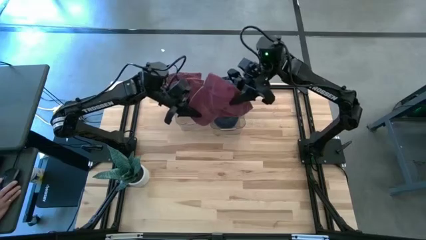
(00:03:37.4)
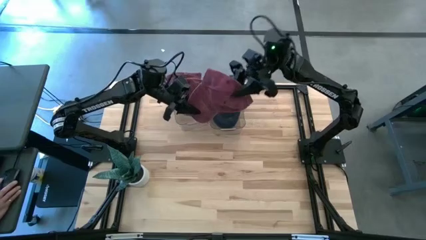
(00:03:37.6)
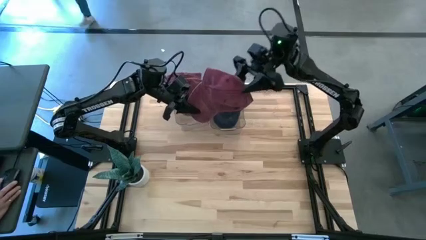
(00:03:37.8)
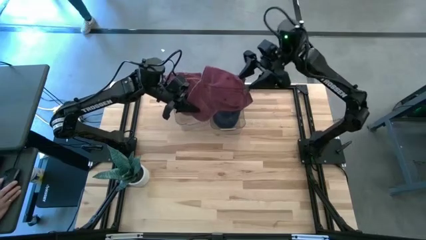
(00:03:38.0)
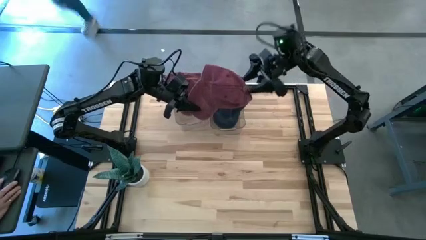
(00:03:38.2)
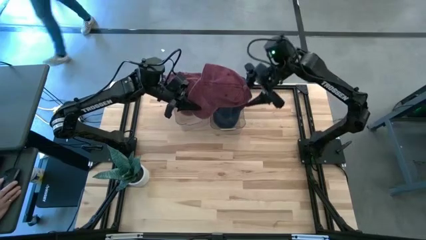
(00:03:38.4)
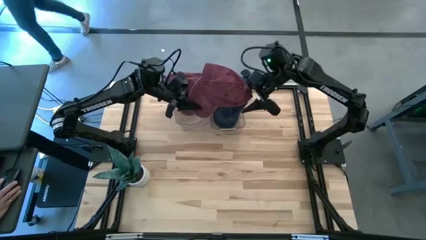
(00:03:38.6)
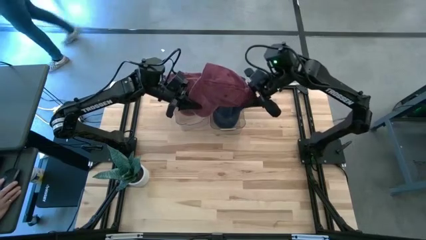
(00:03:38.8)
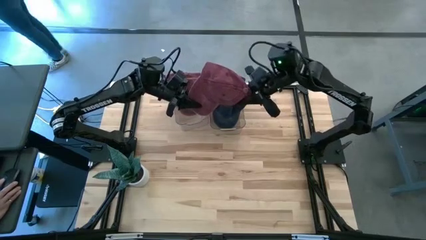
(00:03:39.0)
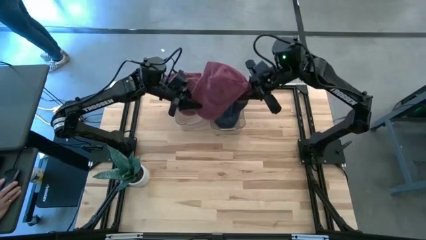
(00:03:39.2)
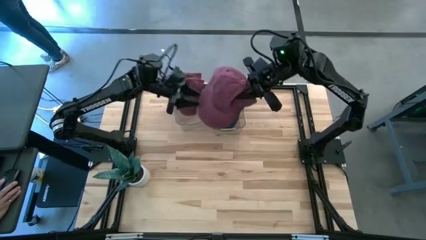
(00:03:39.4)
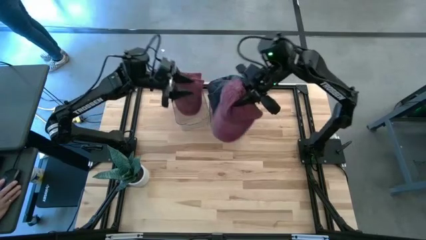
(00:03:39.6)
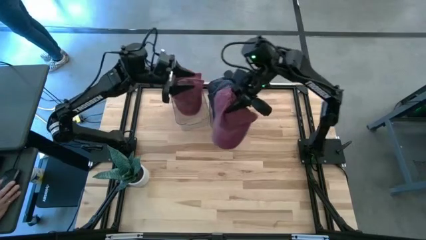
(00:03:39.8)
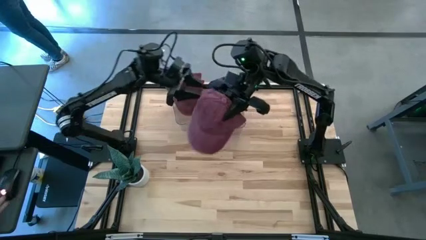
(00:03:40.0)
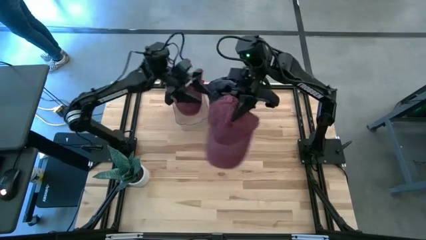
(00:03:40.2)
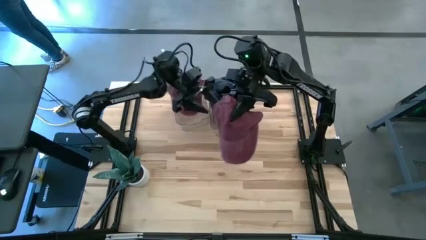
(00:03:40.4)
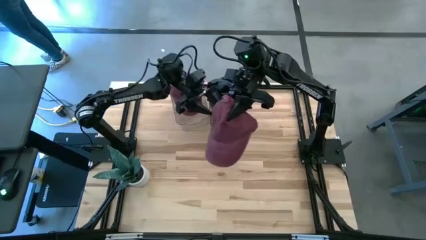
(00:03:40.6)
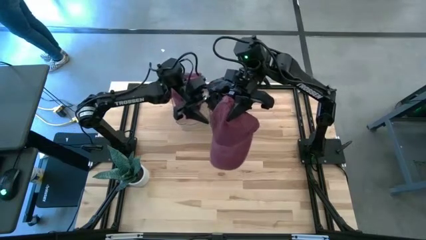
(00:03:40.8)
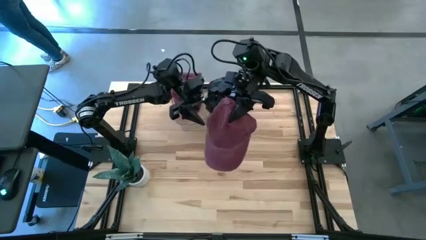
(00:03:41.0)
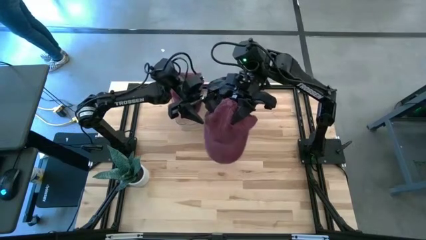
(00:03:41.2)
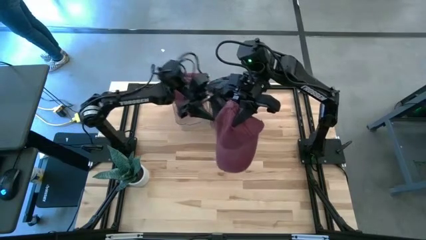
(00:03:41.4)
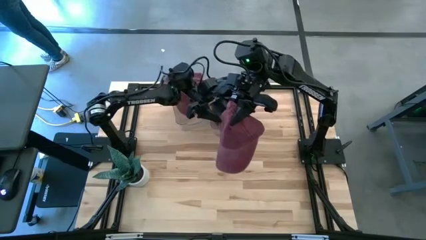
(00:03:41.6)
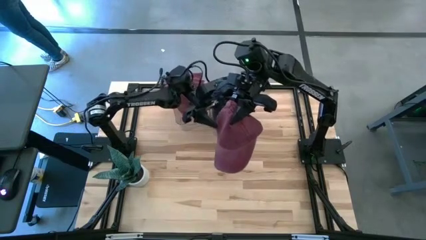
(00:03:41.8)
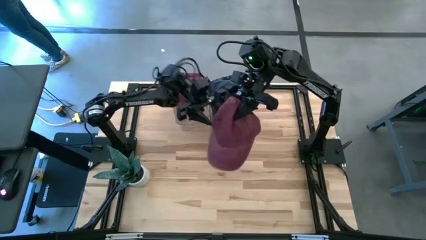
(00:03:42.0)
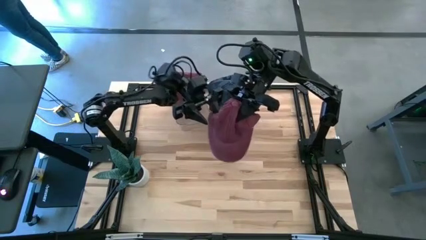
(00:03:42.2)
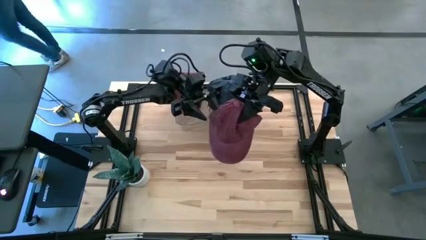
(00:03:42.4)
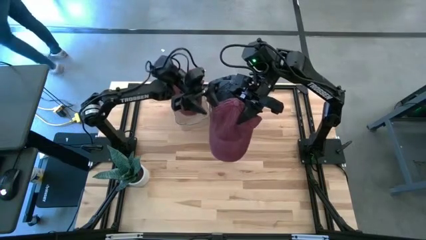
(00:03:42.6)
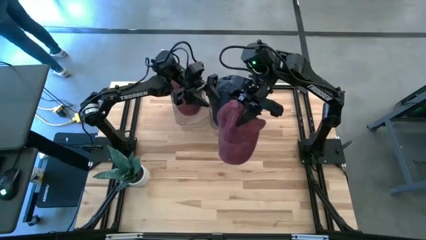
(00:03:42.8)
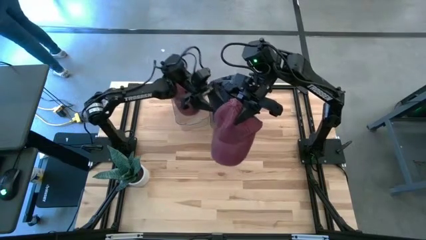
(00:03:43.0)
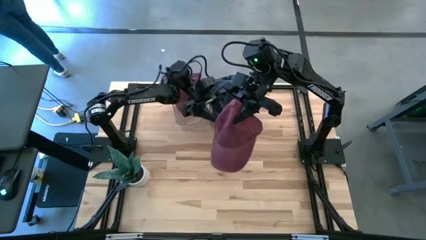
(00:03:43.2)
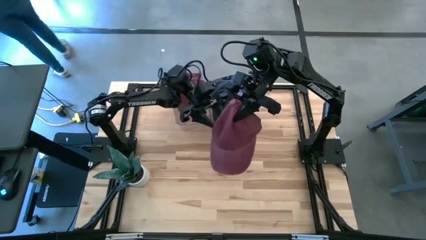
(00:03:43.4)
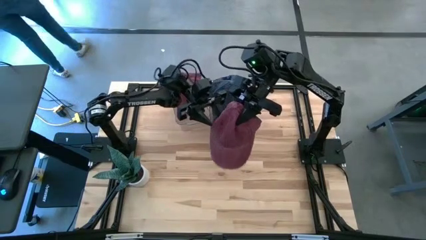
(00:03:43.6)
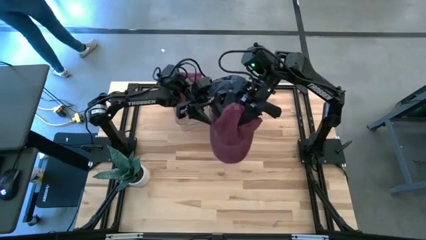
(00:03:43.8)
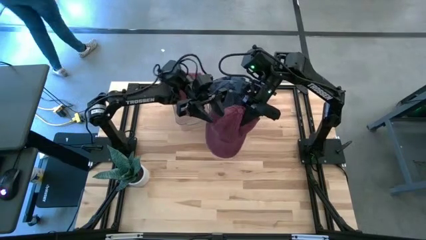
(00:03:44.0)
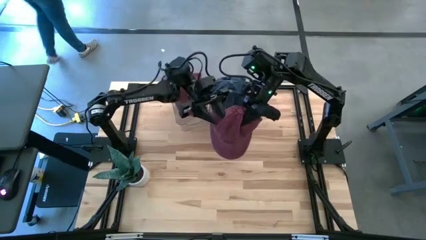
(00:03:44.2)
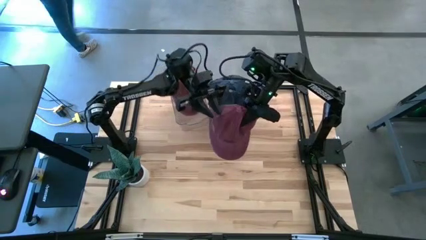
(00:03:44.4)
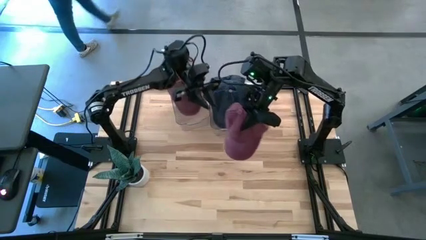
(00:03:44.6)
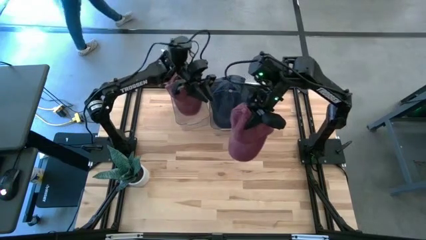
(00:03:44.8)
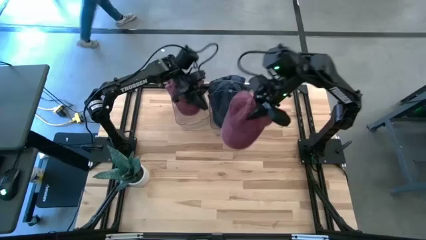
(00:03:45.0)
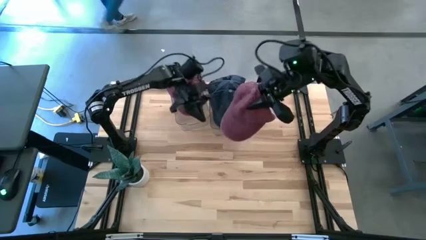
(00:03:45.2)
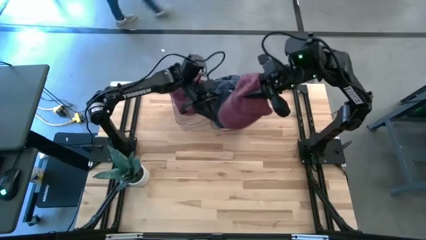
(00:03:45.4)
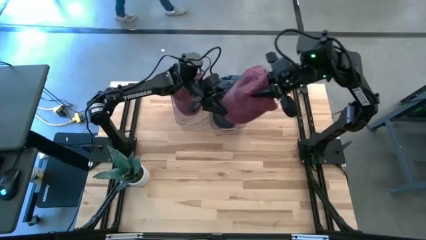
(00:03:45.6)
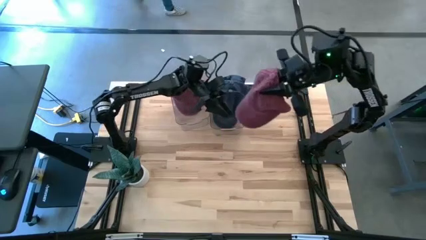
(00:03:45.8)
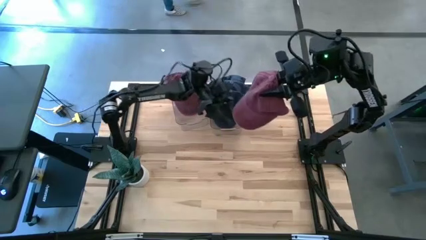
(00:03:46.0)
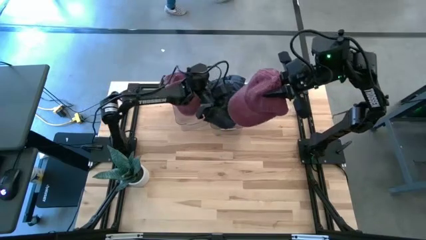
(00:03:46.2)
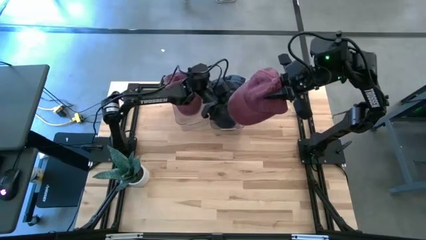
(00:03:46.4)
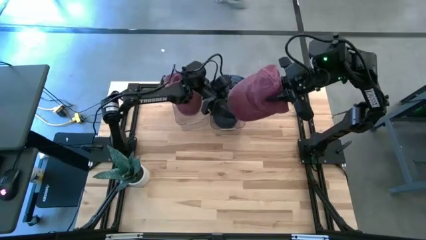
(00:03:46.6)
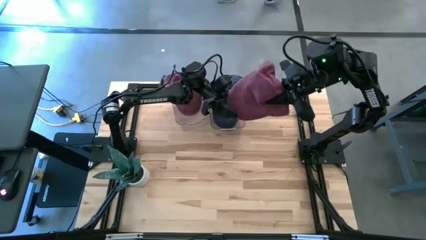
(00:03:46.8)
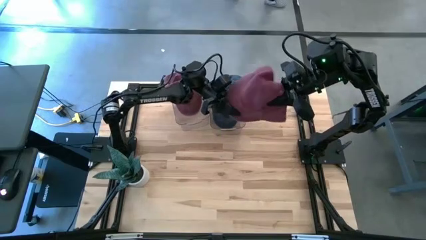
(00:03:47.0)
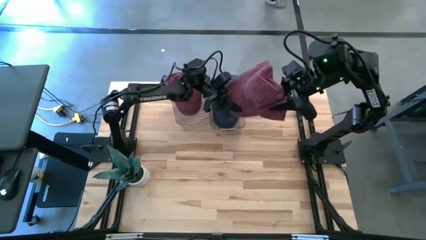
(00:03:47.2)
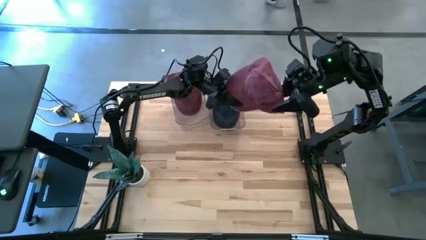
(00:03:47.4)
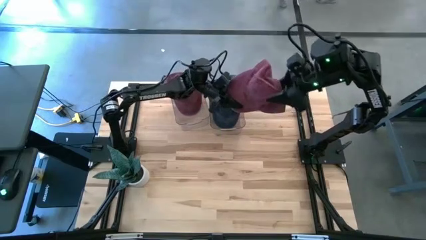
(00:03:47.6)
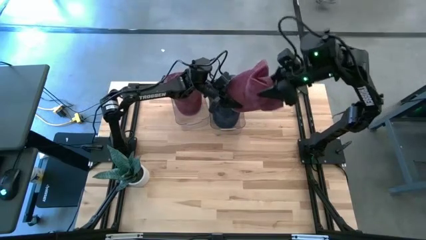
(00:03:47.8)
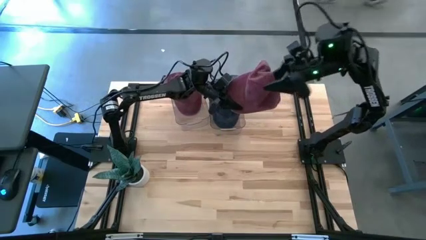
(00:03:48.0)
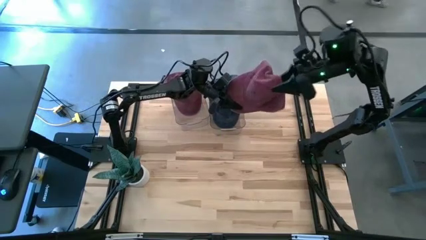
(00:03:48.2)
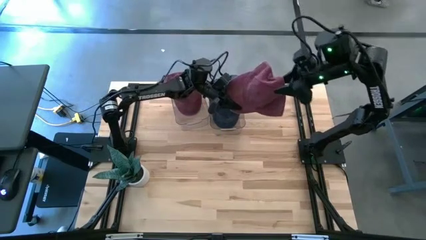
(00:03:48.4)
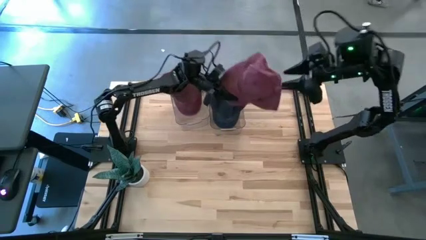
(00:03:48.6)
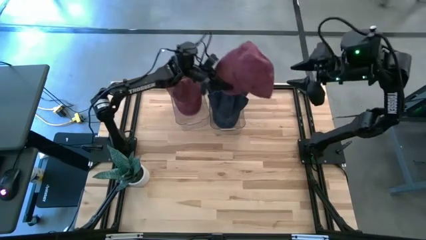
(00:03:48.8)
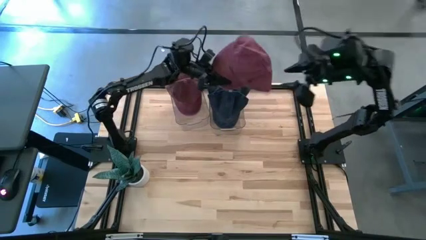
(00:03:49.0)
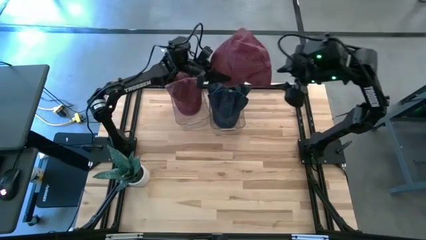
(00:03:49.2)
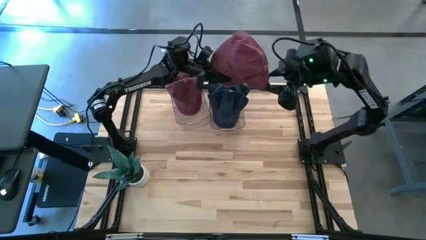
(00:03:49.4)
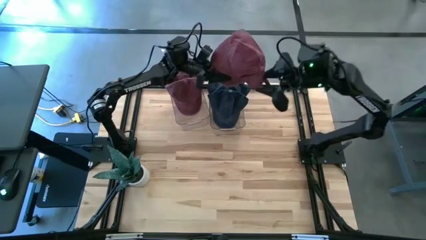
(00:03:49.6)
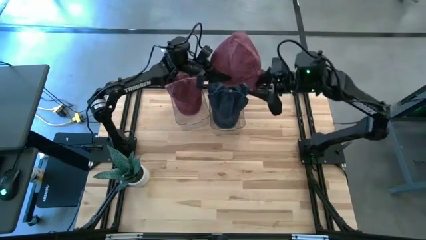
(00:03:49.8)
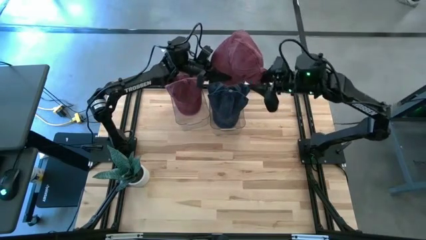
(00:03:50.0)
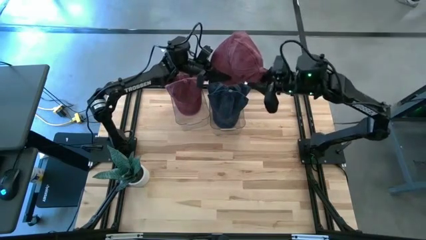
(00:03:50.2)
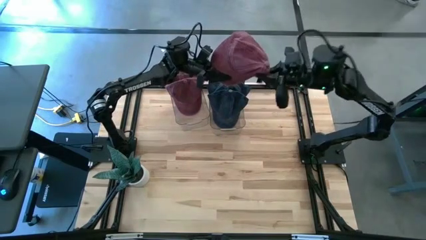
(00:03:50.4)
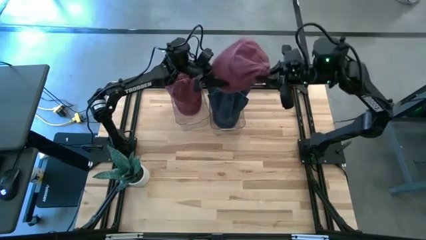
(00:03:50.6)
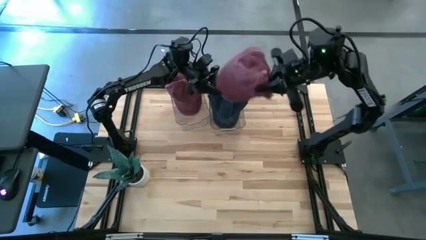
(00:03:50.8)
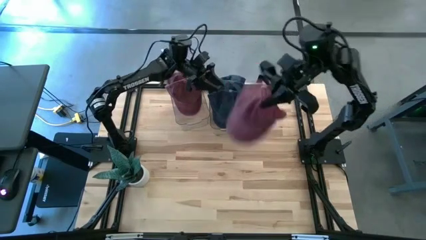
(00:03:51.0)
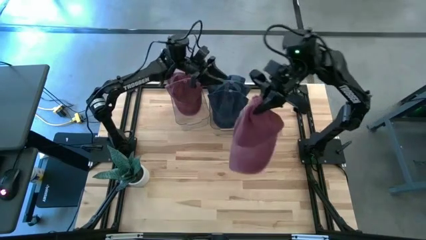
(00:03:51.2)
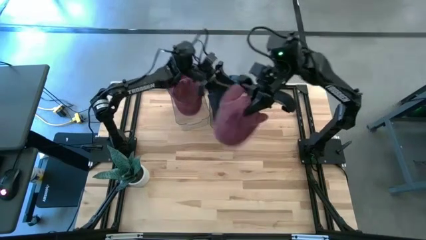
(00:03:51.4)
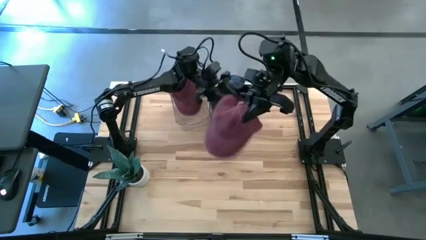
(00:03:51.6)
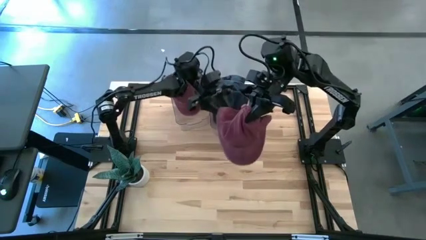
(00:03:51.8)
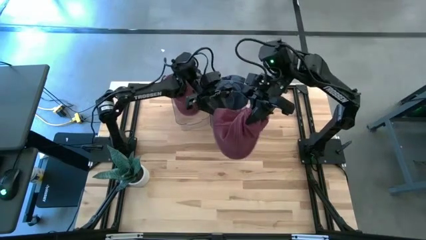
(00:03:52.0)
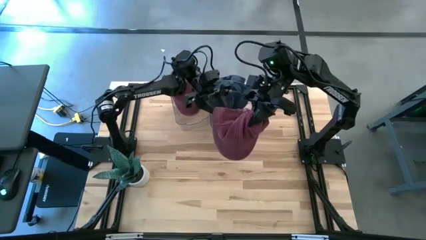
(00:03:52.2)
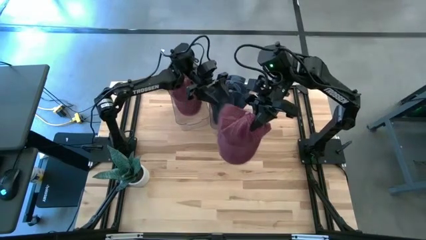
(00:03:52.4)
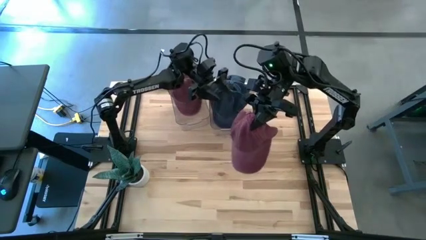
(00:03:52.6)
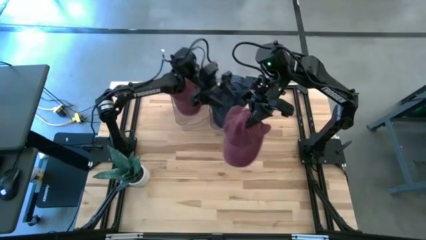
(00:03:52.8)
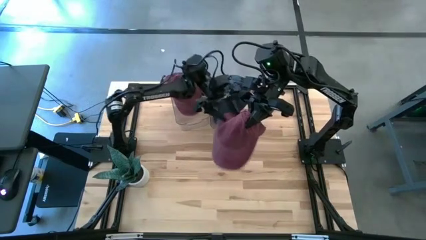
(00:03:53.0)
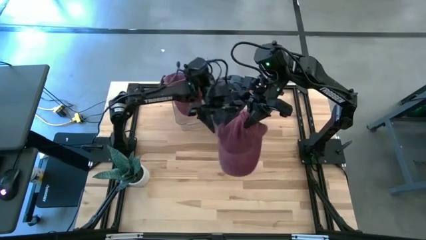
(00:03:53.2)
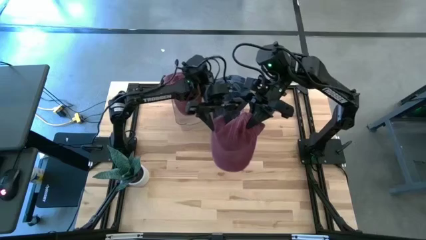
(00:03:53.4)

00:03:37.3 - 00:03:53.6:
Task: Pick & Place hat
Put the red cap into the left bin
